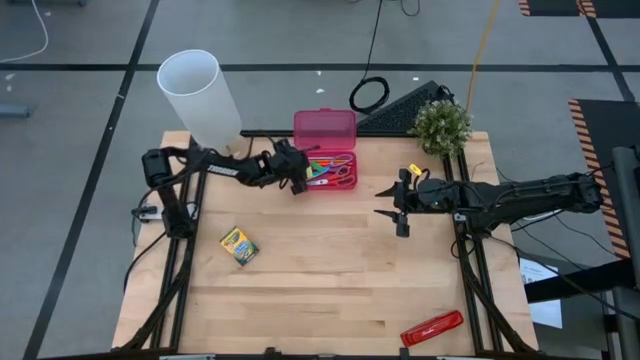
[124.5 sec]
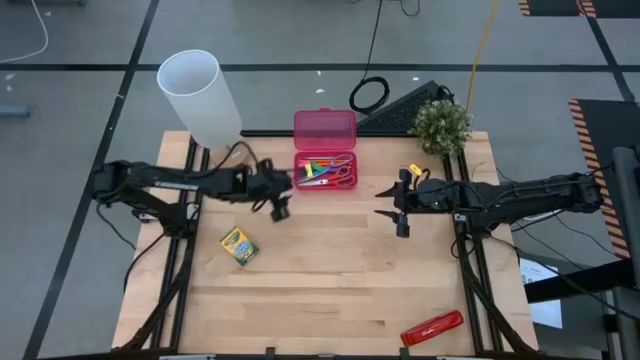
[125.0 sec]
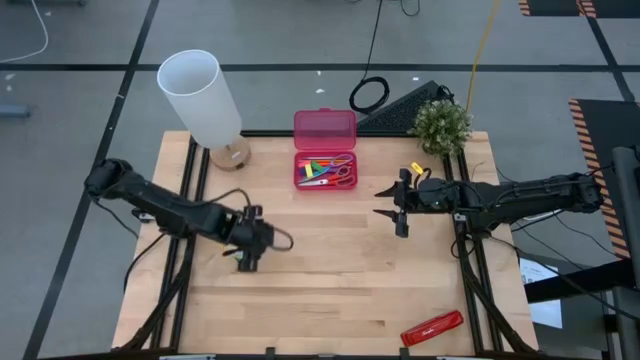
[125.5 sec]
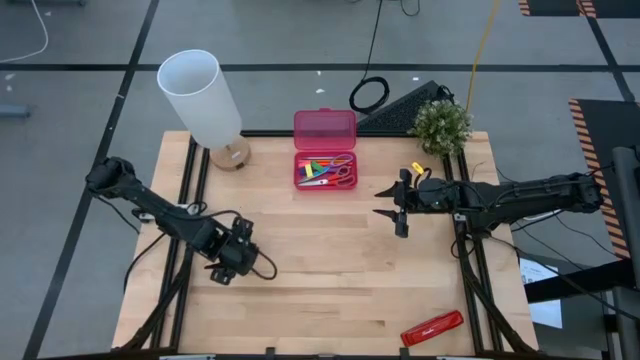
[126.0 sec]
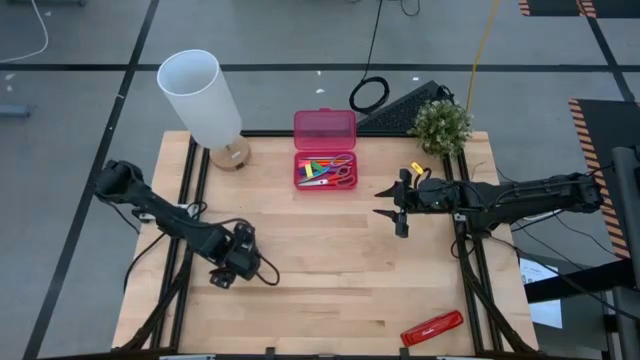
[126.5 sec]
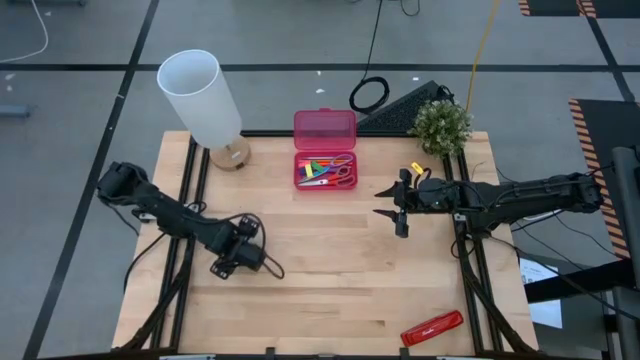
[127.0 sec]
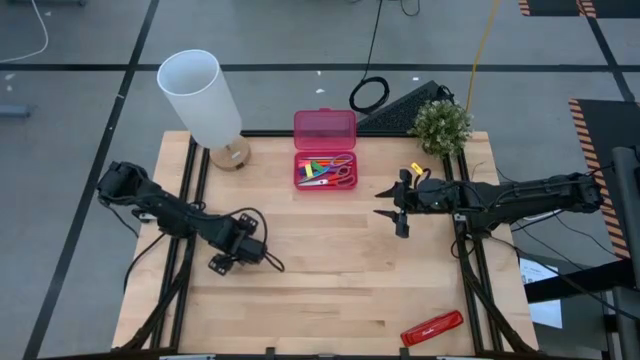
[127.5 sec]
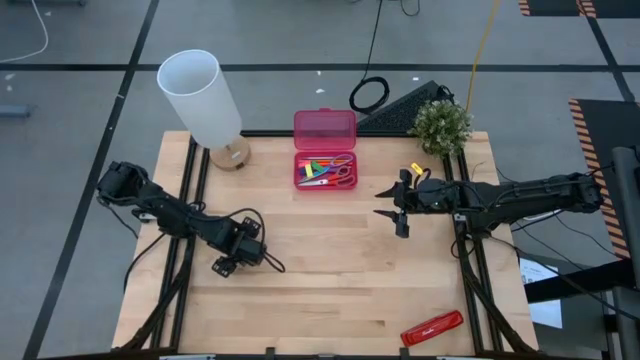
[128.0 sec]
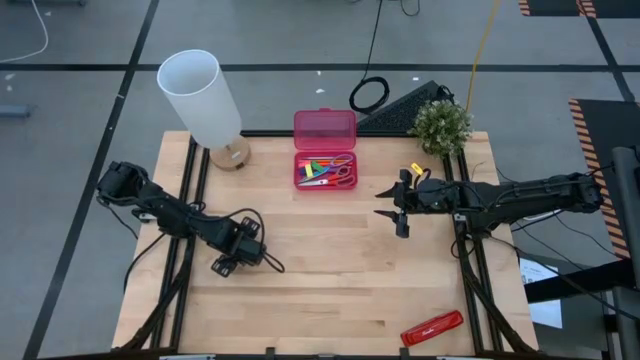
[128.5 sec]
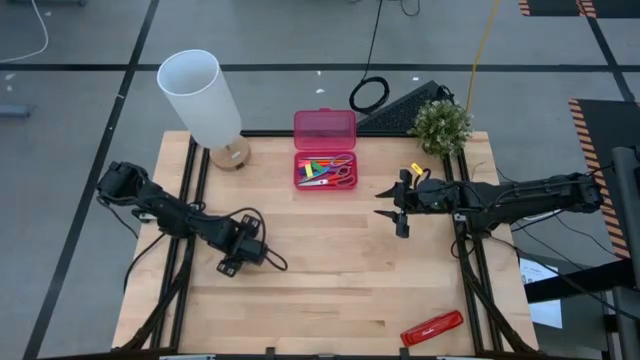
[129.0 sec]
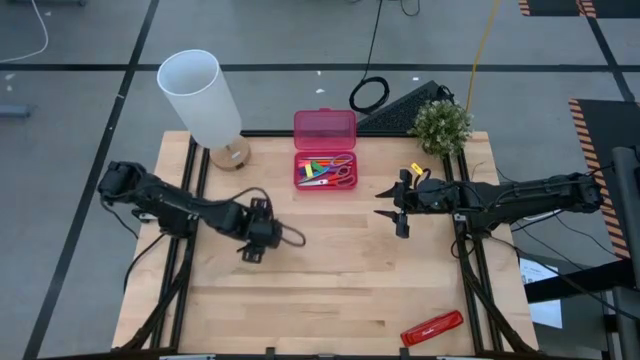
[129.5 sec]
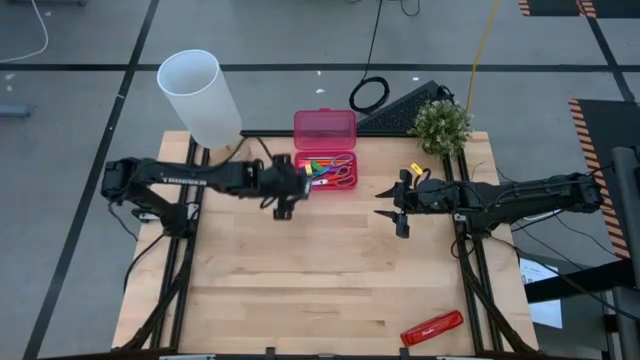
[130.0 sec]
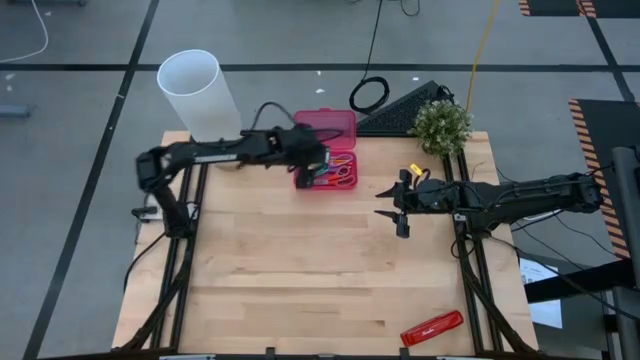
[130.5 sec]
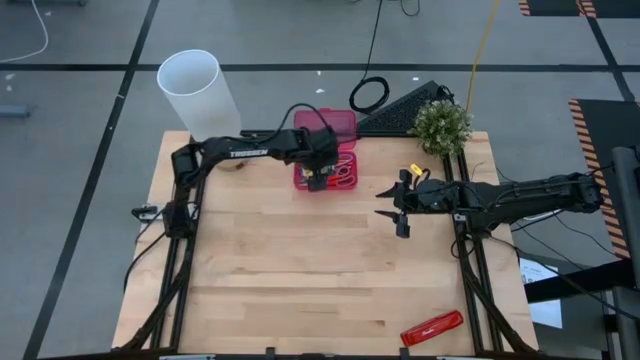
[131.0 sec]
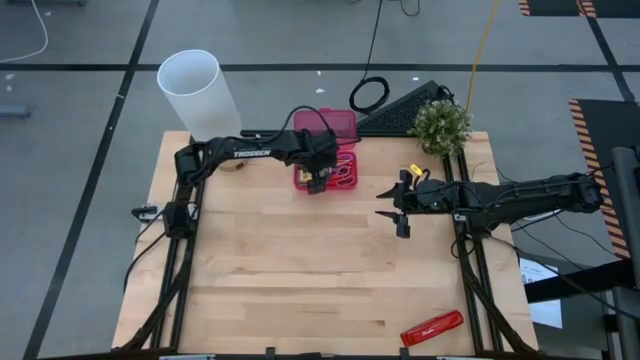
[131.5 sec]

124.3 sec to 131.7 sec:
Task: Pack school essentials
Put the crayon box into the red supply box

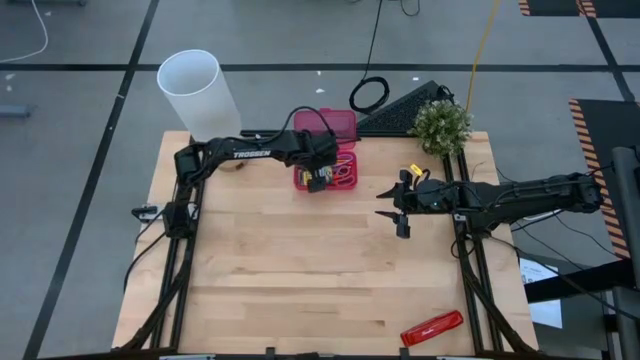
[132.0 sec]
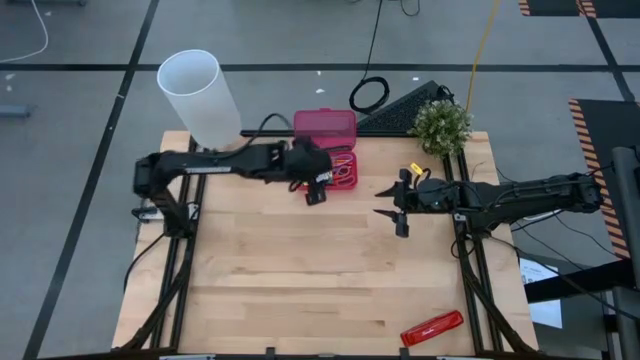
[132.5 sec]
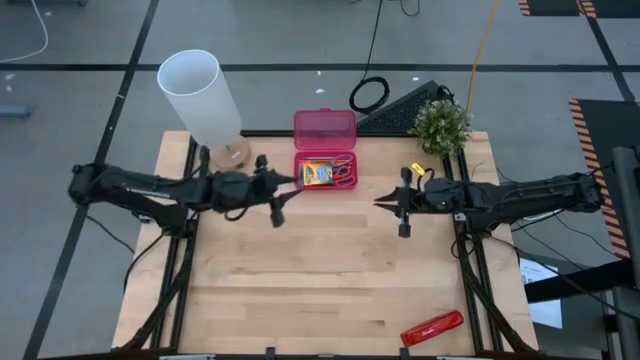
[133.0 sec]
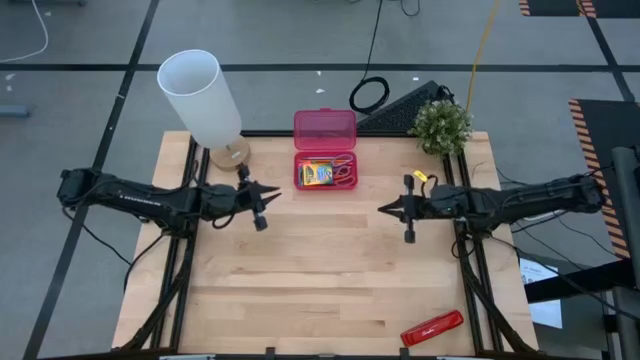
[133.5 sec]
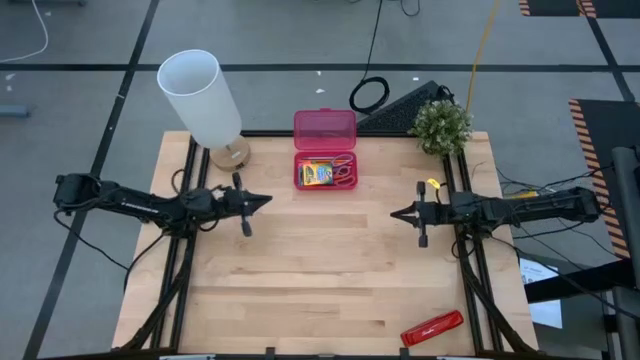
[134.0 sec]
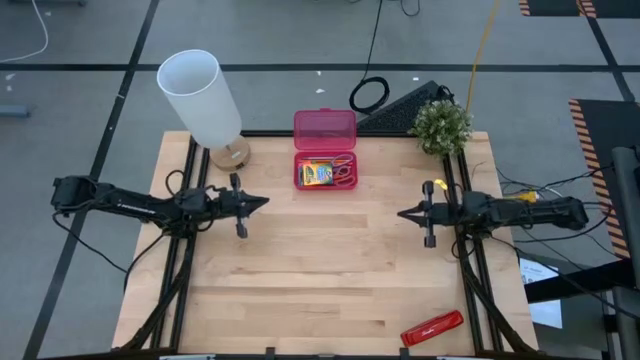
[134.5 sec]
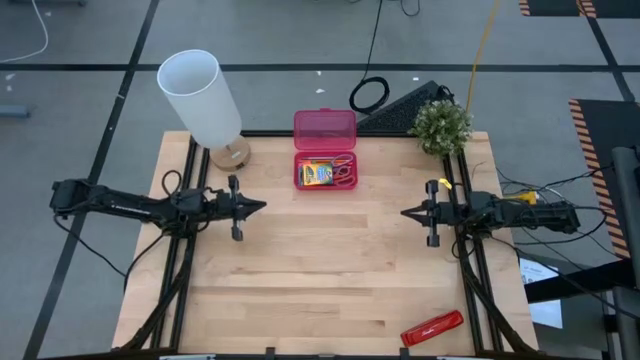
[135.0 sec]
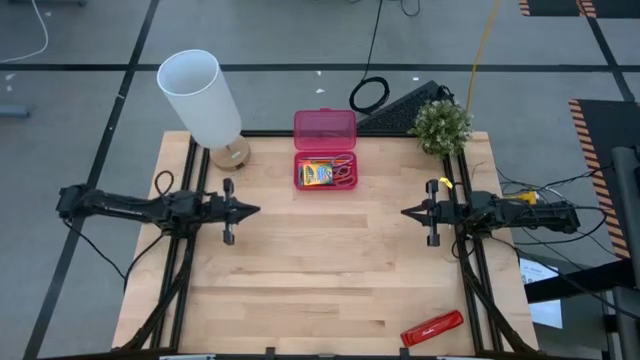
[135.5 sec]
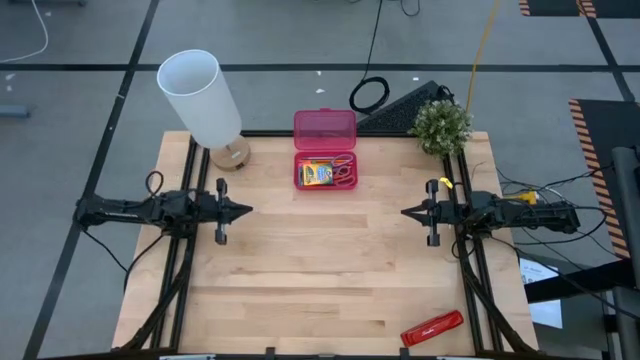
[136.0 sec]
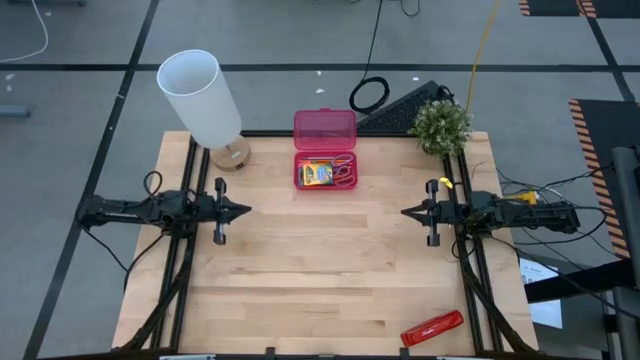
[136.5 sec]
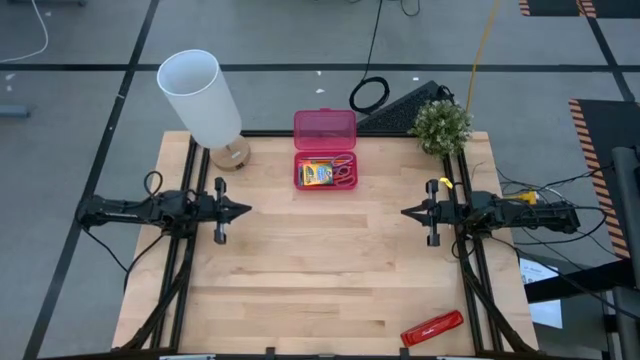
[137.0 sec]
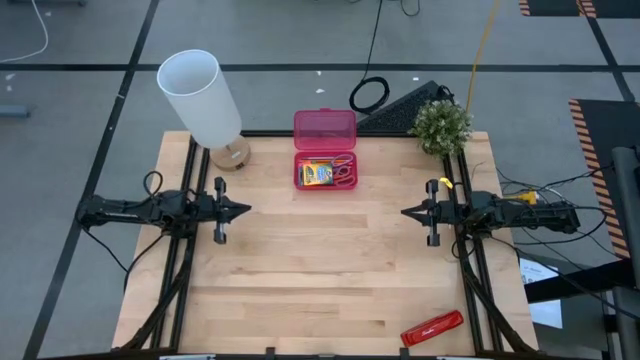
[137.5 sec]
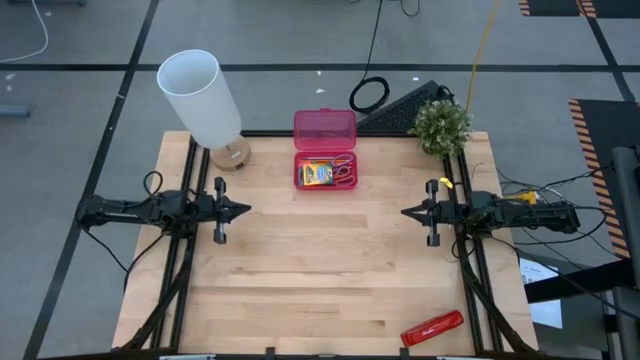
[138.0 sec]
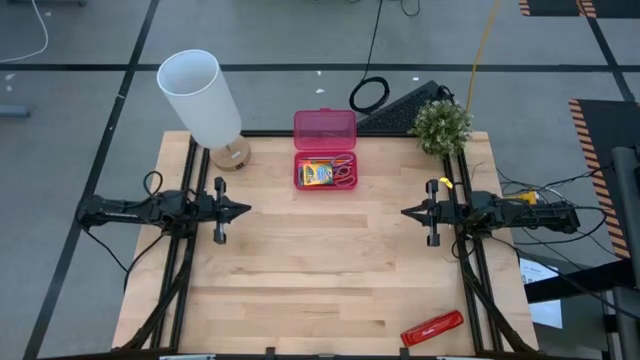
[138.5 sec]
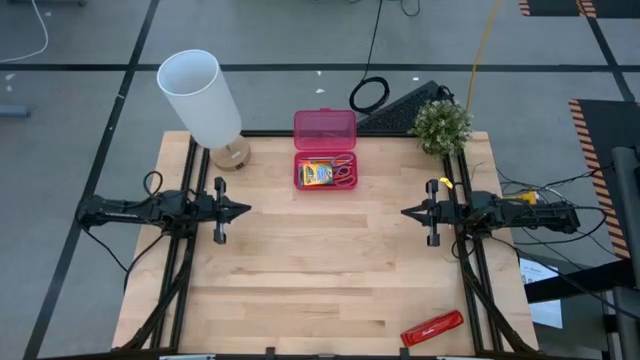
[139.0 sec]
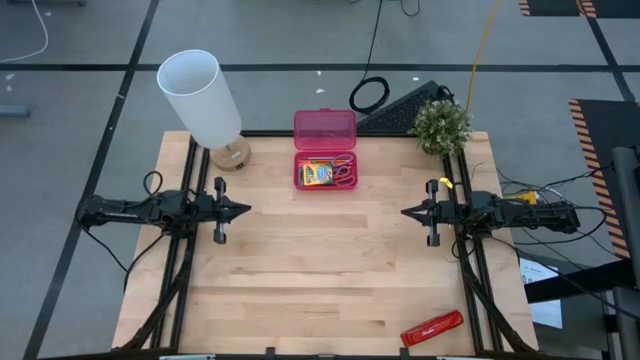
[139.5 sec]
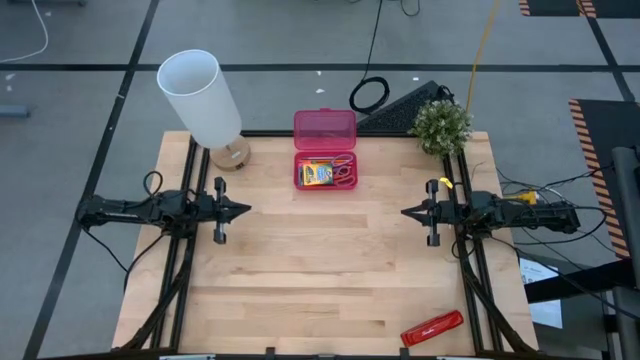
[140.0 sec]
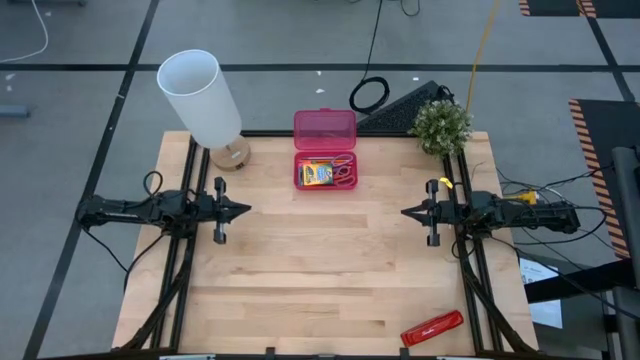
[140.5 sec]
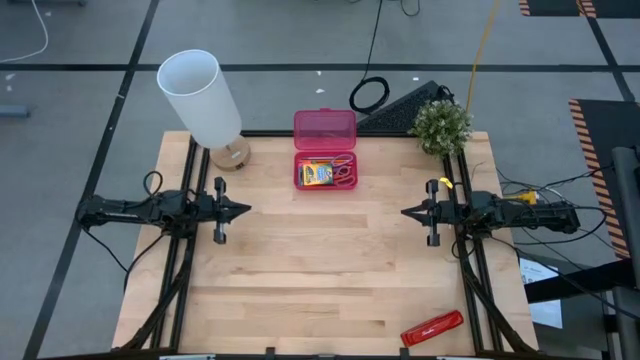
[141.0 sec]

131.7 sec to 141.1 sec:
Return to Home Position
